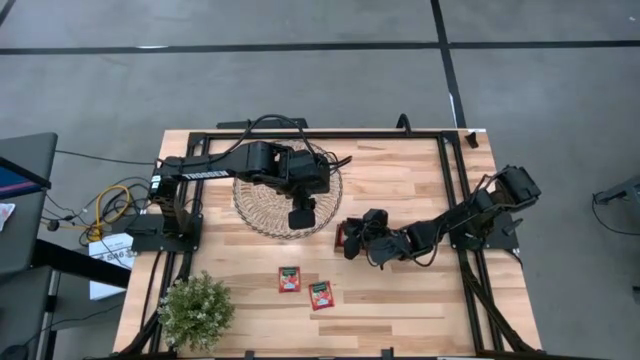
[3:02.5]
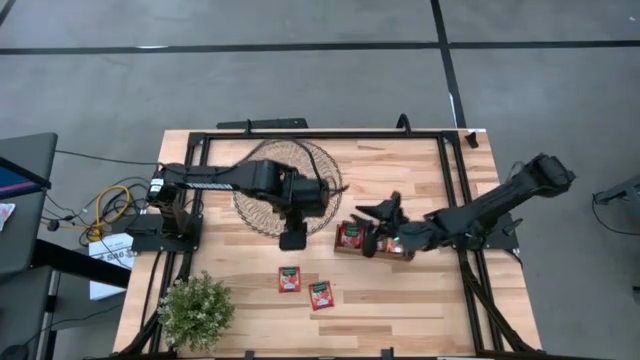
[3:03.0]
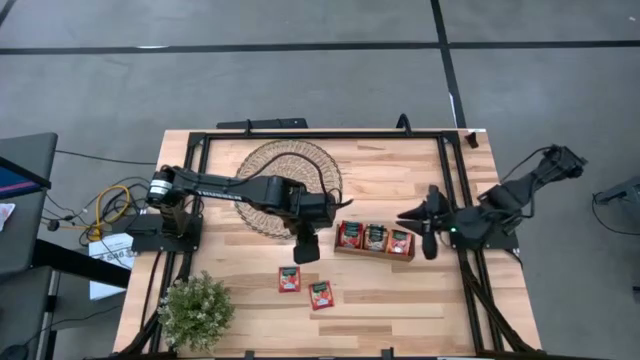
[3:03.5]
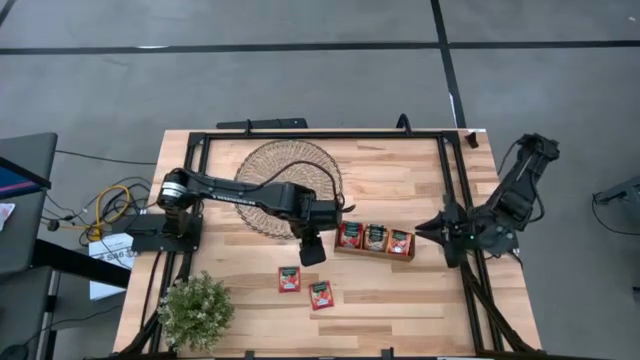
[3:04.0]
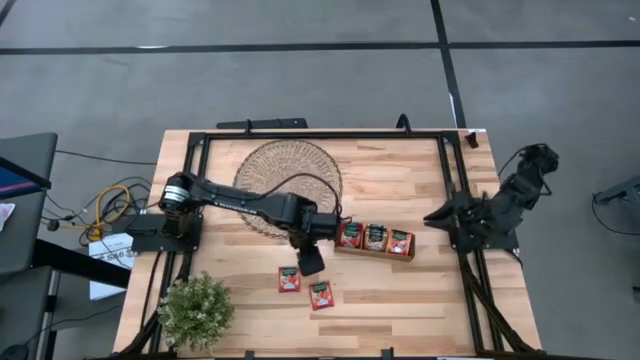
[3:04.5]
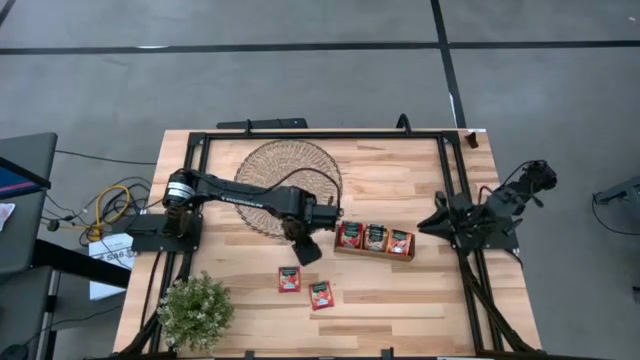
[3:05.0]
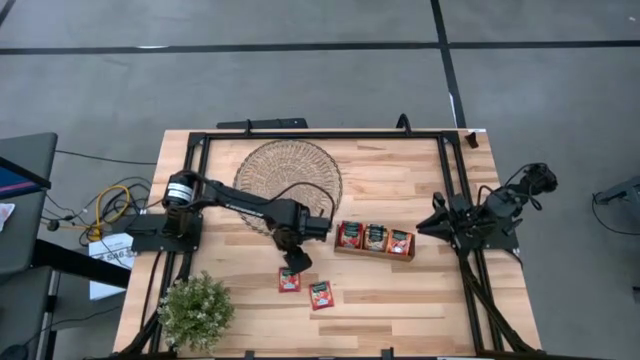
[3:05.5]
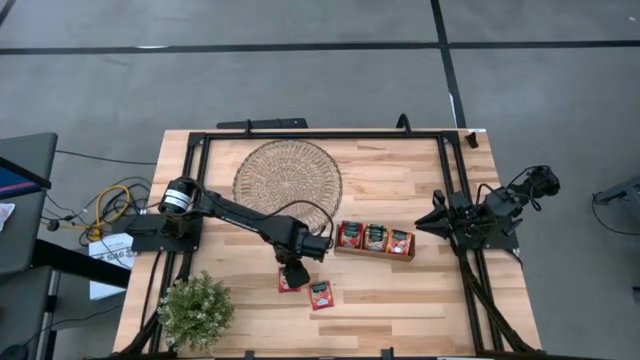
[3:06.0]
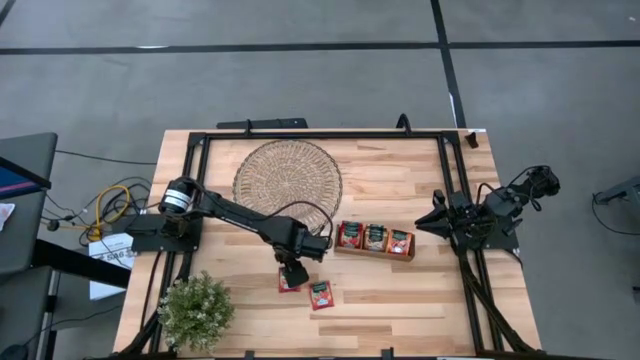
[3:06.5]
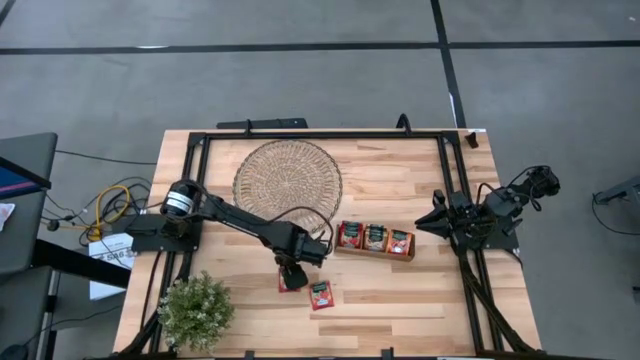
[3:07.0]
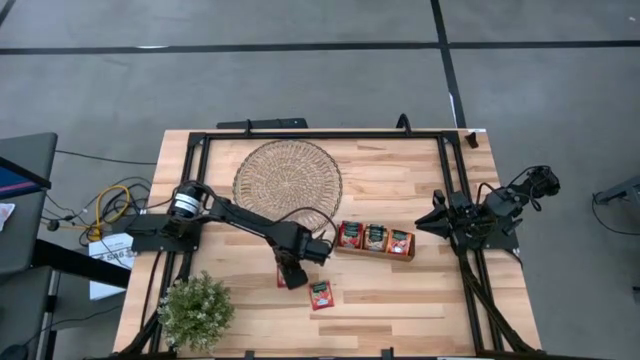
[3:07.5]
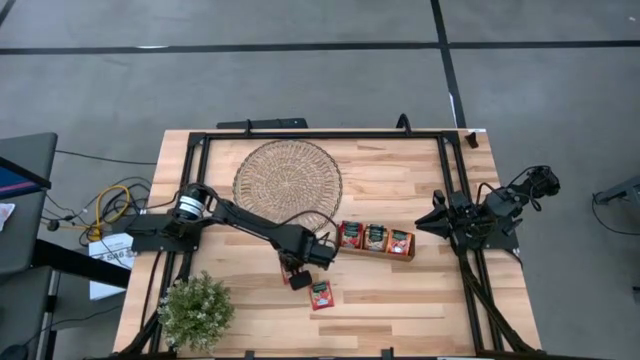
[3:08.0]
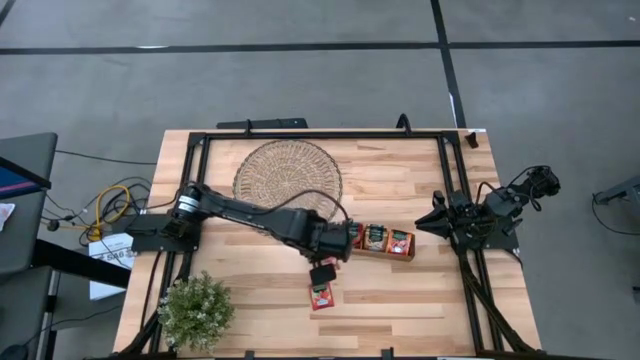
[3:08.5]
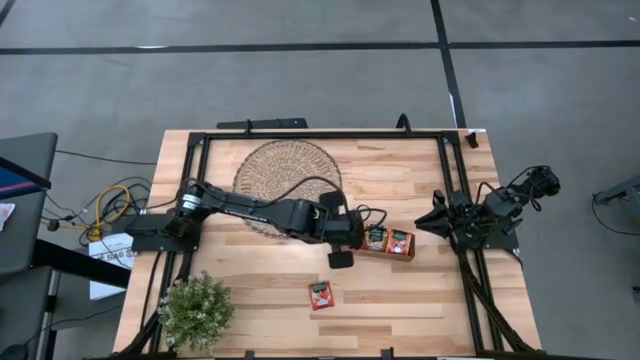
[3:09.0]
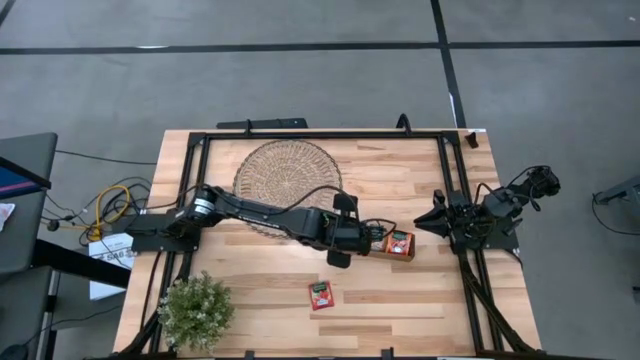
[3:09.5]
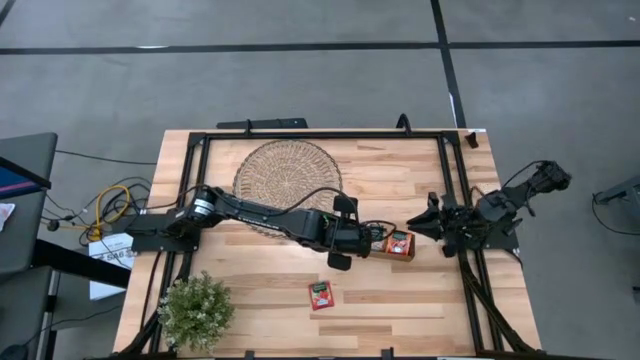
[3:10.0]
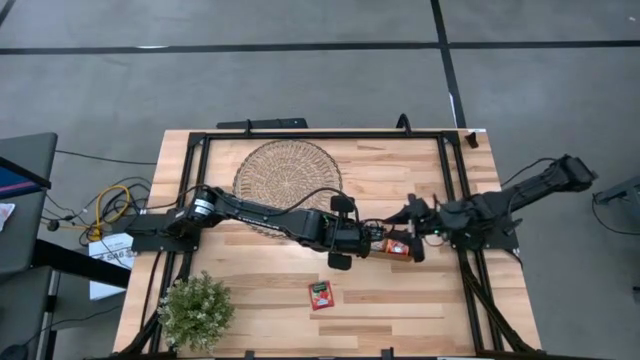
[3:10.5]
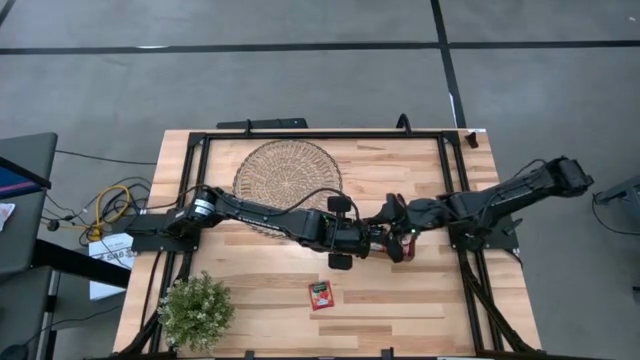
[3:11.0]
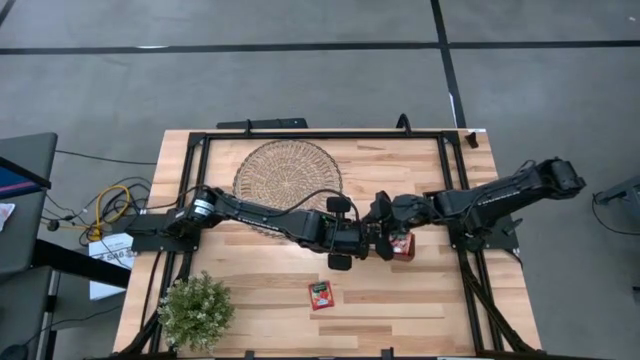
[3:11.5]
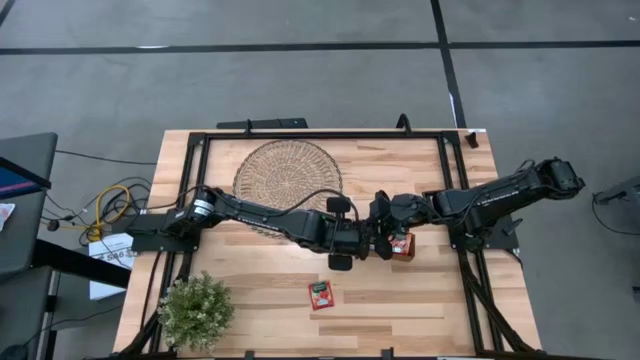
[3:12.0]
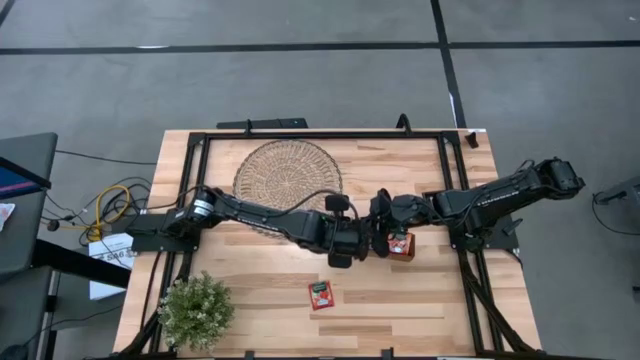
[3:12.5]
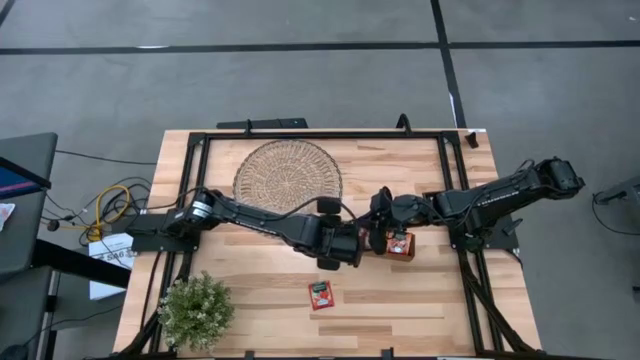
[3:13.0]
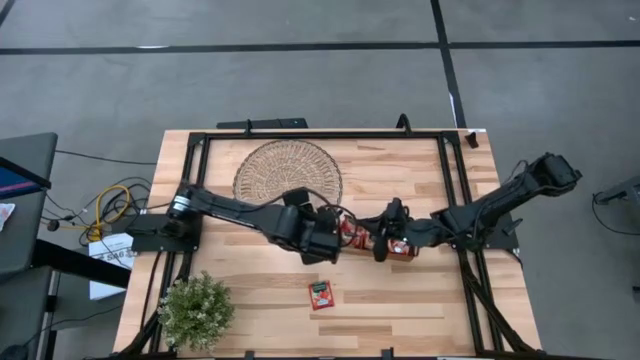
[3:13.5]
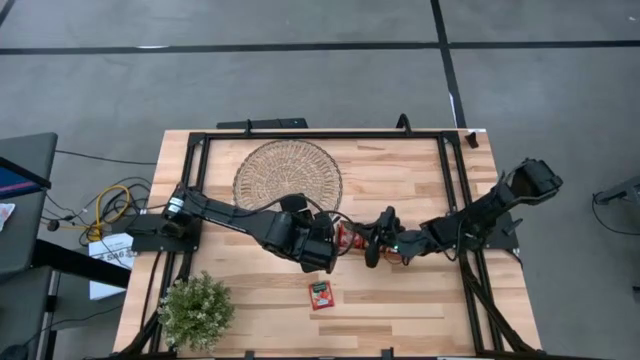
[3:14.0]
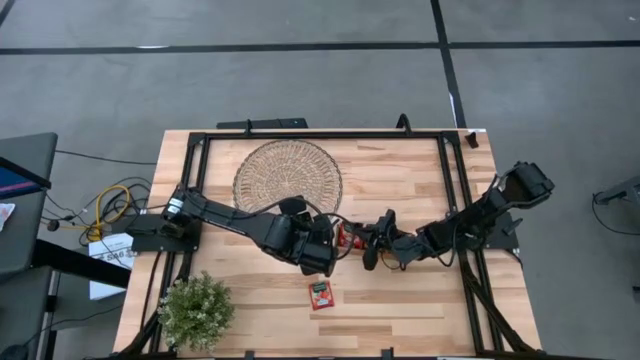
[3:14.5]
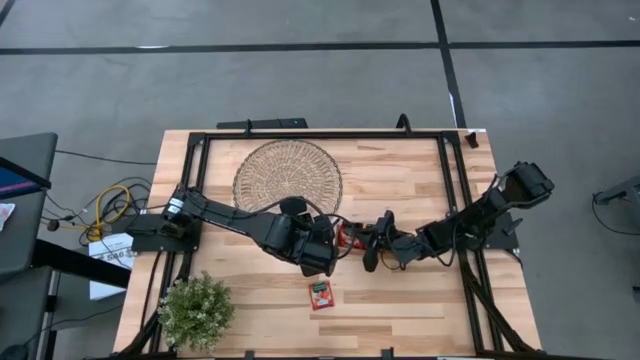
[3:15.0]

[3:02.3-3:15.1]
Task: Pick & Place Tea
Put the red tea bag into the left section of the wooden organizer

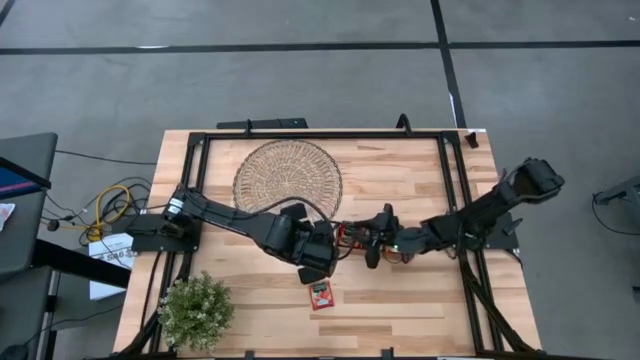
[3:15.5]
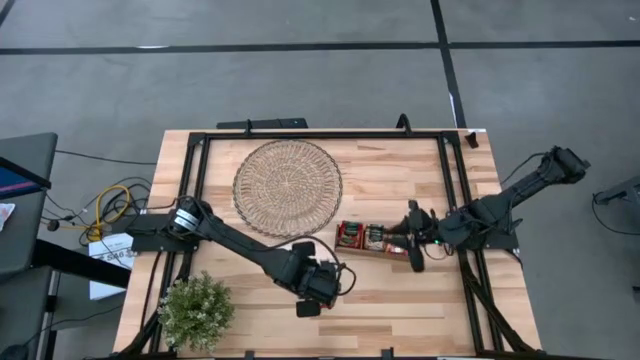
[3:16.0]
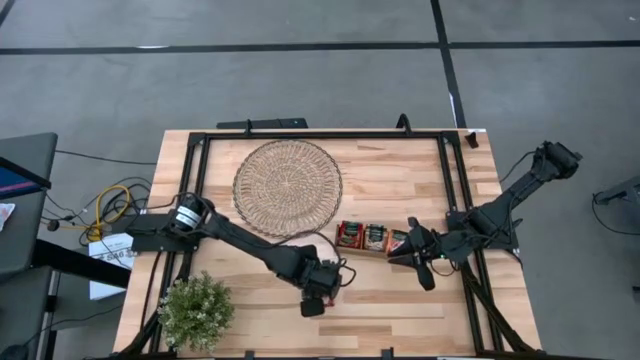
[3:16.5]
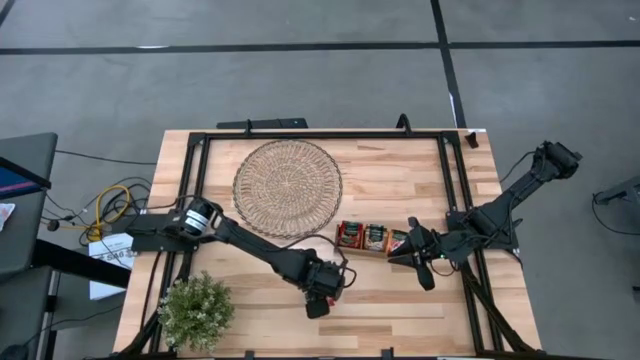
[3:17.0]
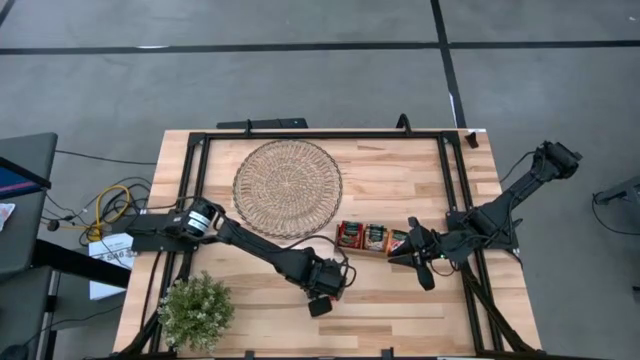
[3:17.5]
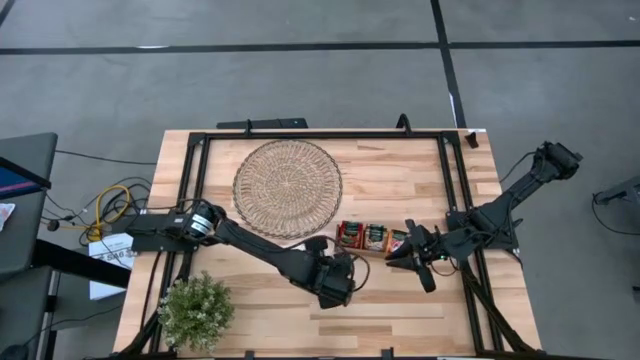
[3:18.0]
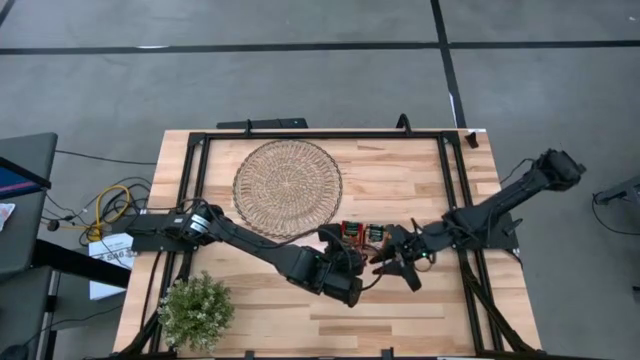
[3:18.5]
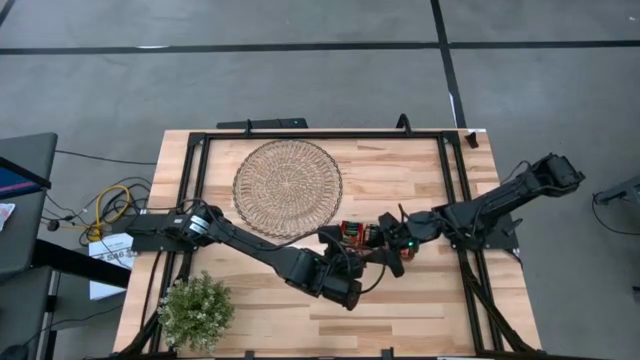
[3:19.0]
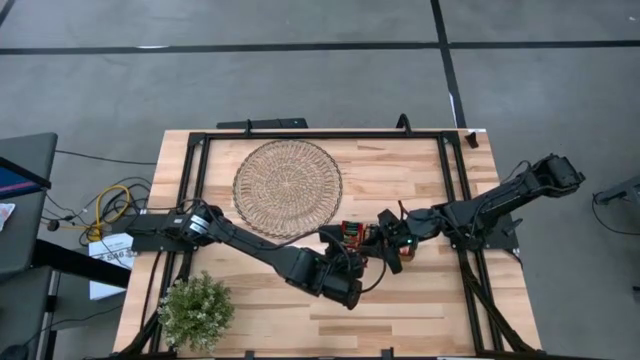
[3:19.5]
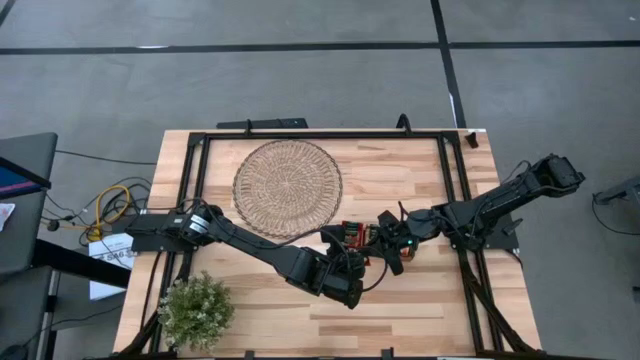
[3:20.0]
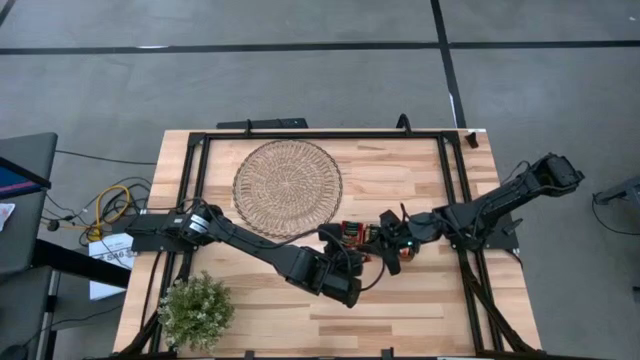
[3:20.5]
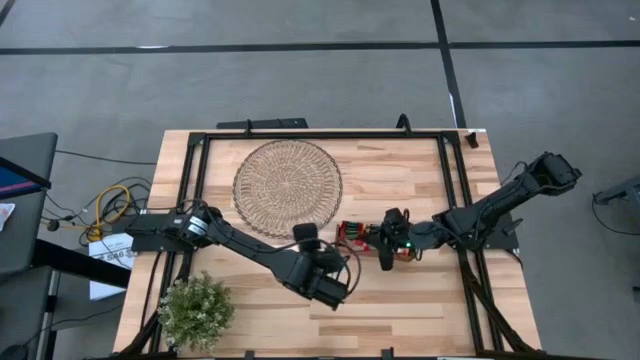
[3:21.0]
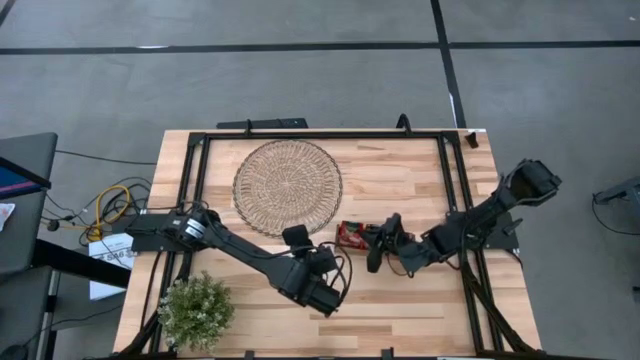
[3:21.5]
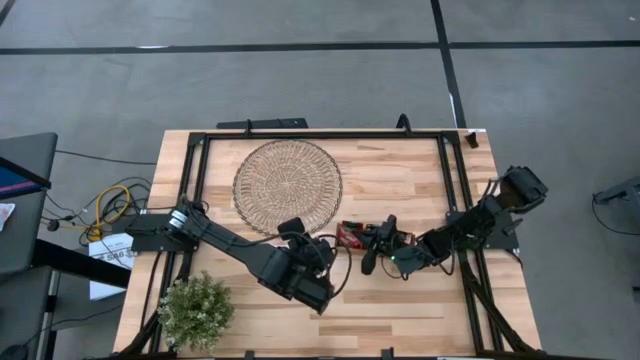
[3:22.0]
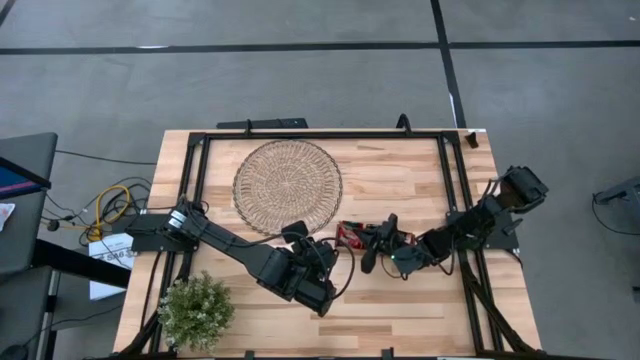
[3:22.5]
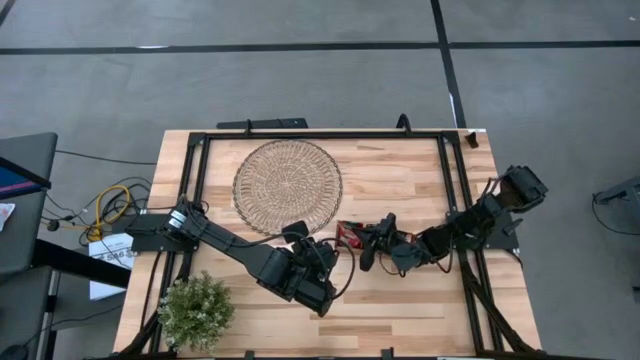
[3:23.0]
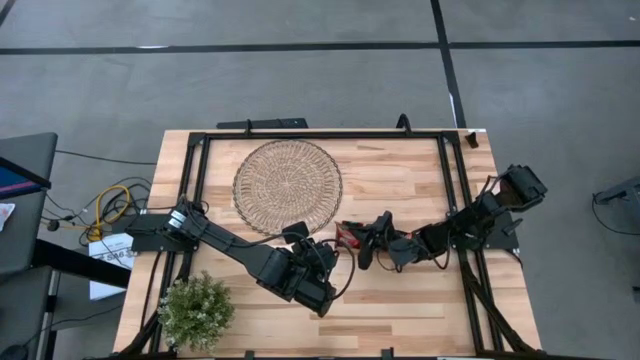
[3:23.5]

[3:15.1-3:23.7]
Put the red tea bag into the left section of the wooden organizer
